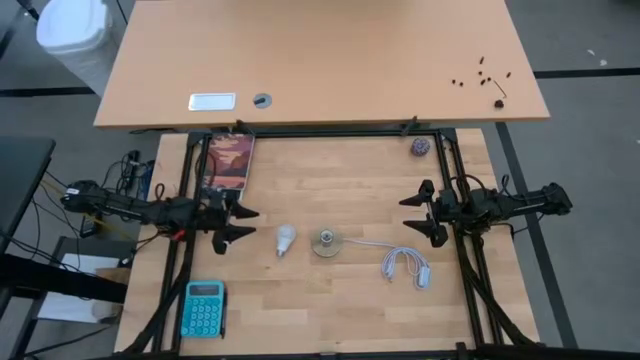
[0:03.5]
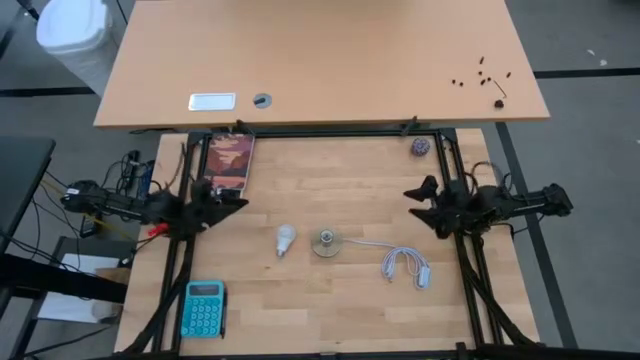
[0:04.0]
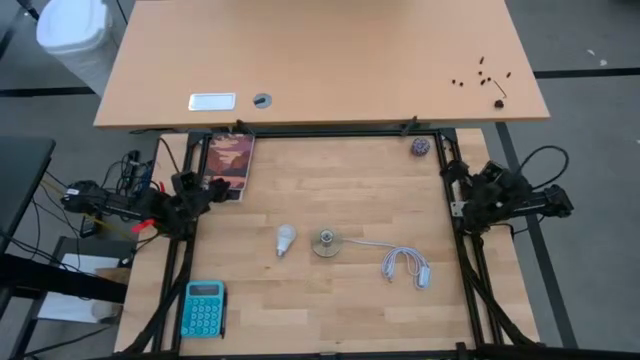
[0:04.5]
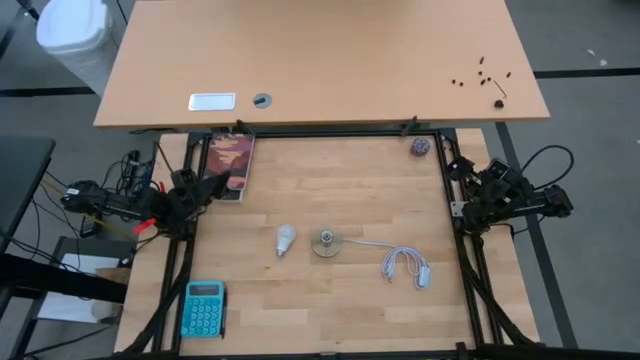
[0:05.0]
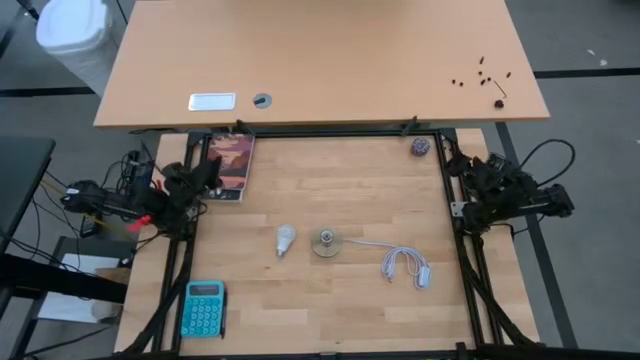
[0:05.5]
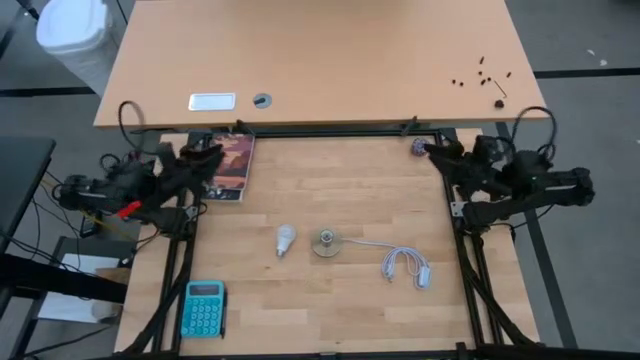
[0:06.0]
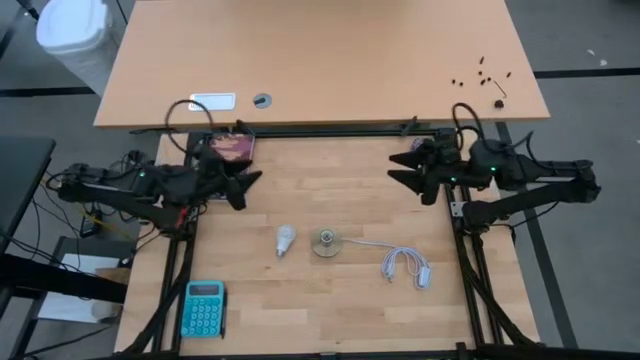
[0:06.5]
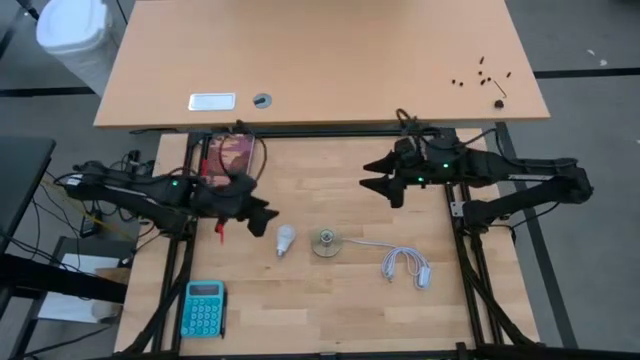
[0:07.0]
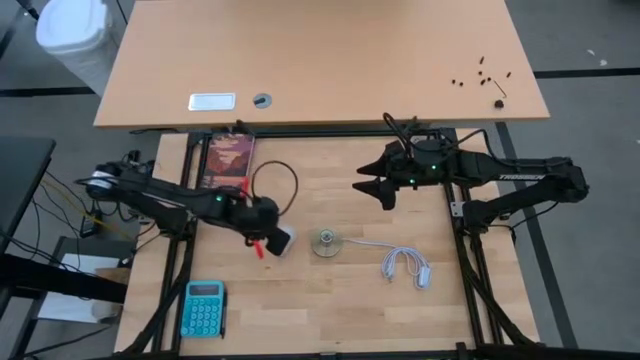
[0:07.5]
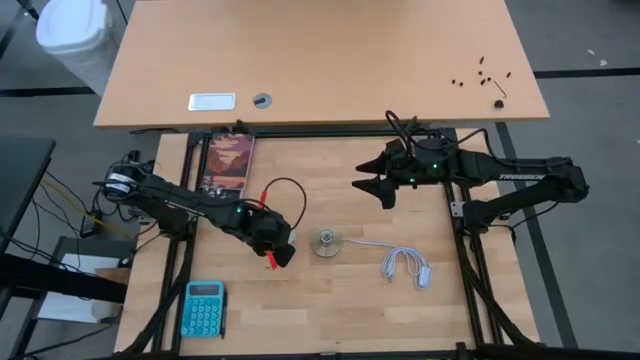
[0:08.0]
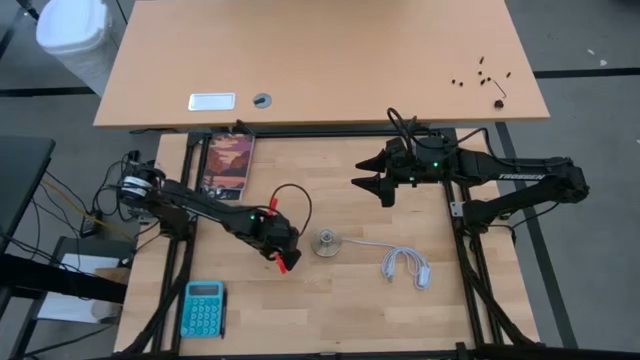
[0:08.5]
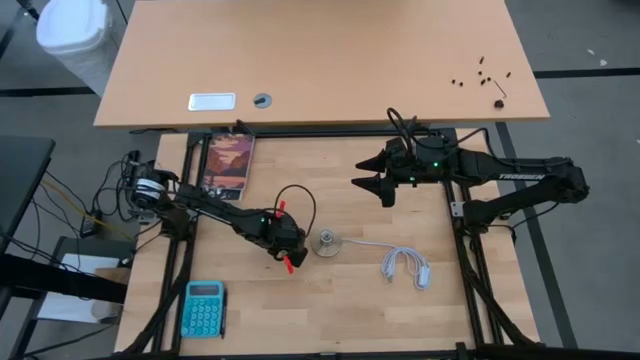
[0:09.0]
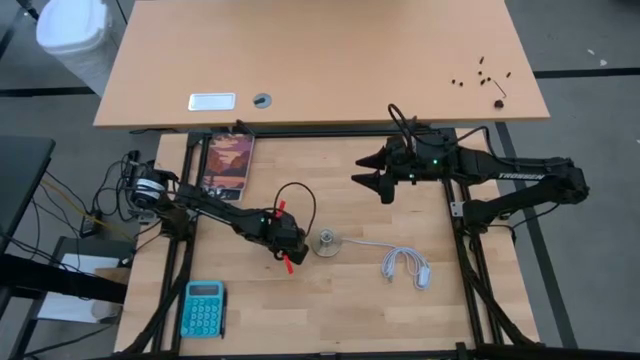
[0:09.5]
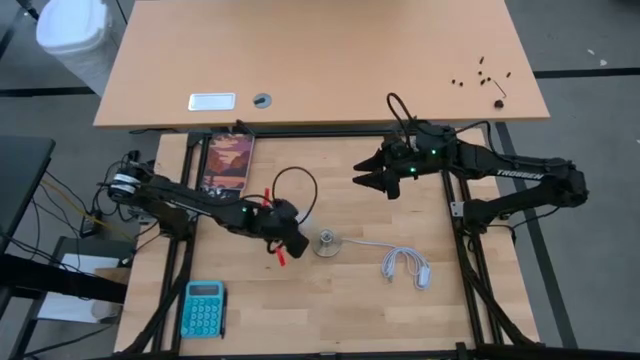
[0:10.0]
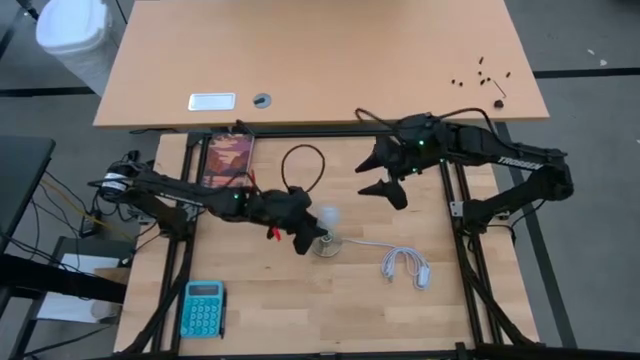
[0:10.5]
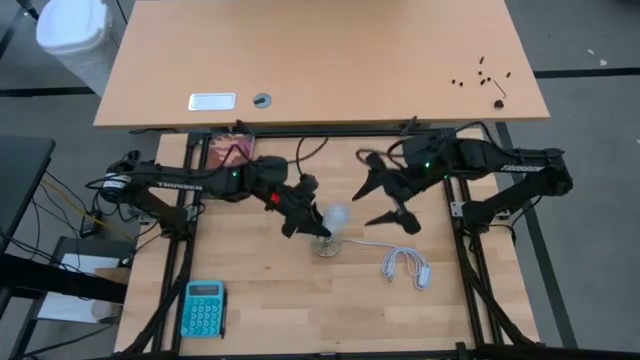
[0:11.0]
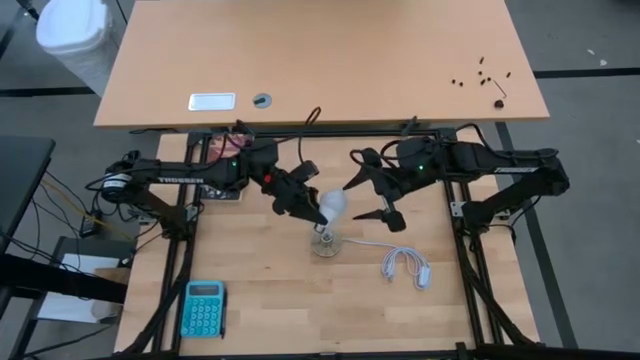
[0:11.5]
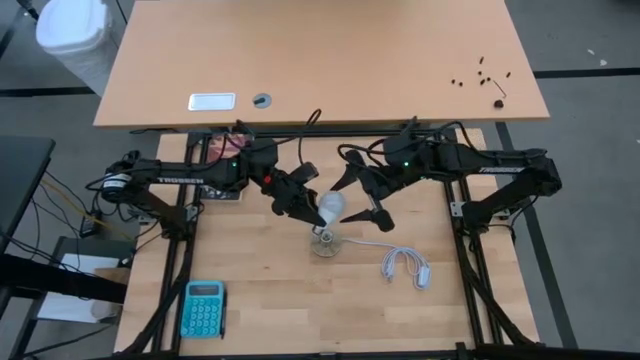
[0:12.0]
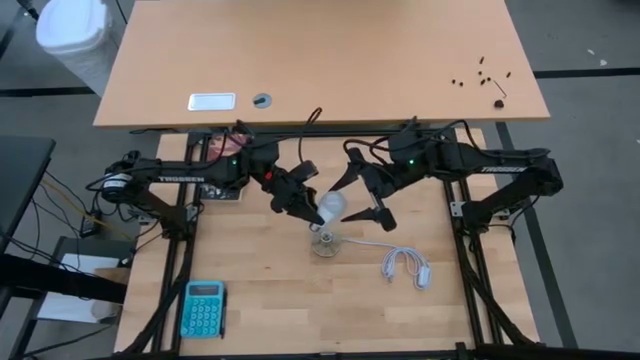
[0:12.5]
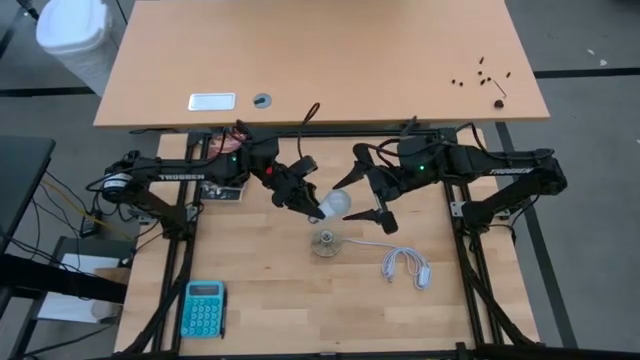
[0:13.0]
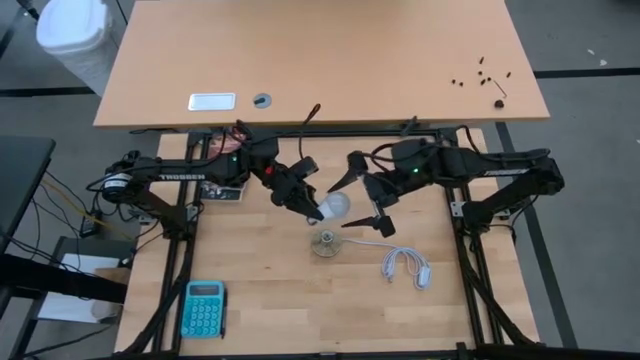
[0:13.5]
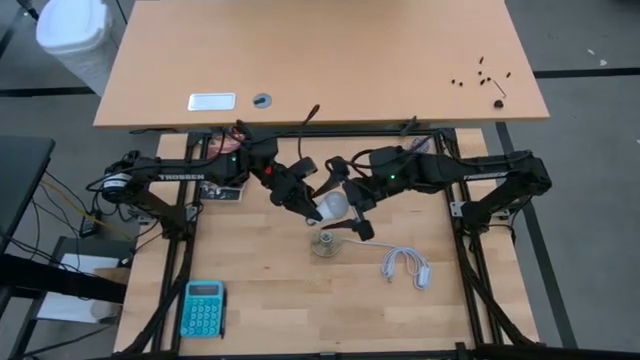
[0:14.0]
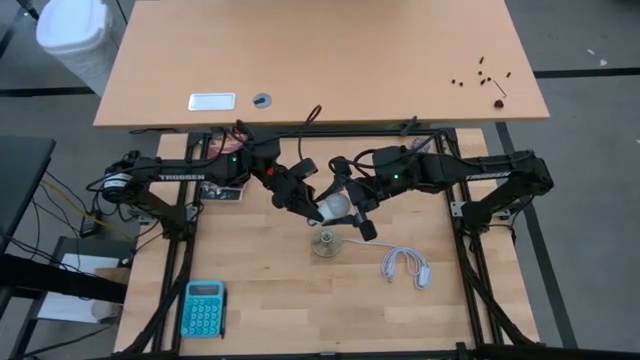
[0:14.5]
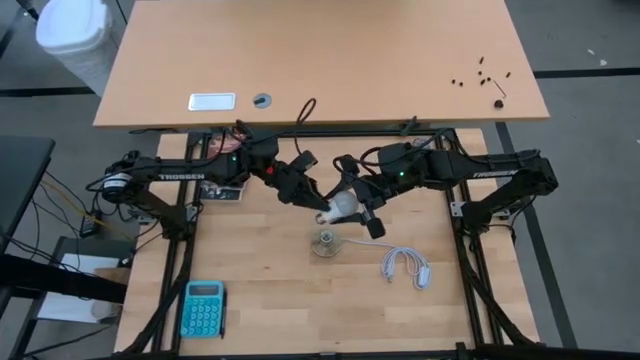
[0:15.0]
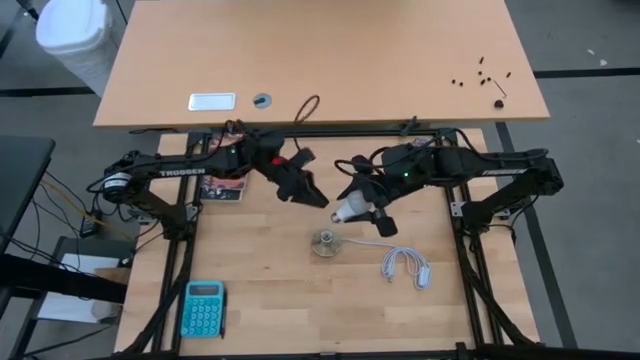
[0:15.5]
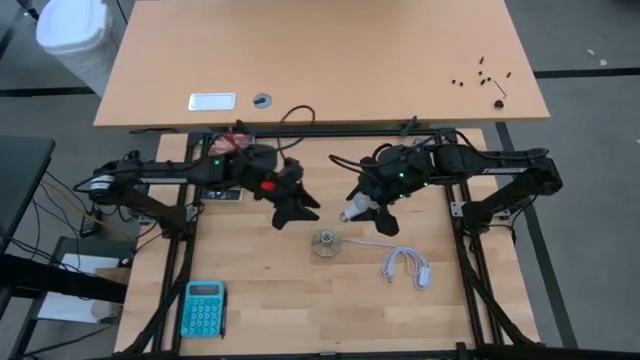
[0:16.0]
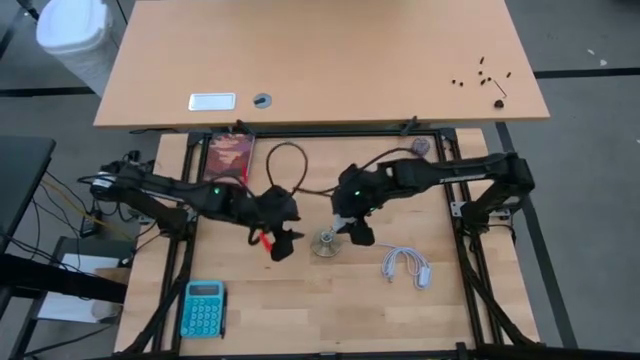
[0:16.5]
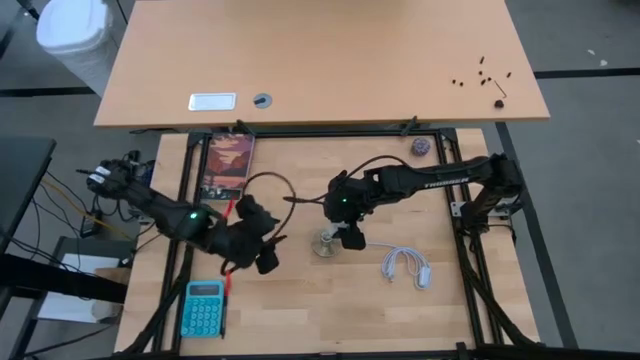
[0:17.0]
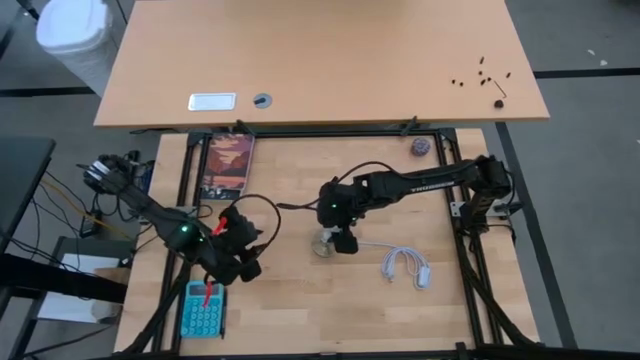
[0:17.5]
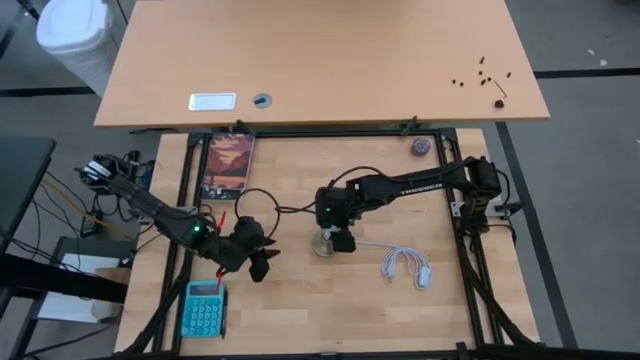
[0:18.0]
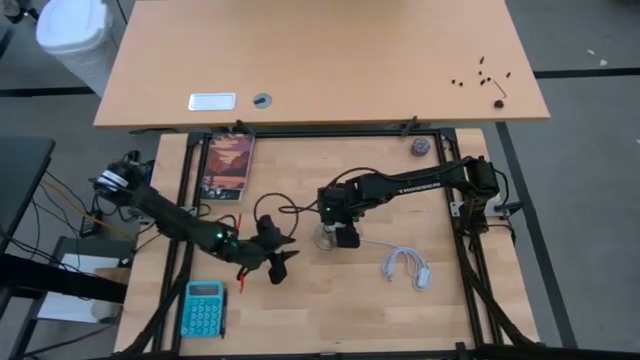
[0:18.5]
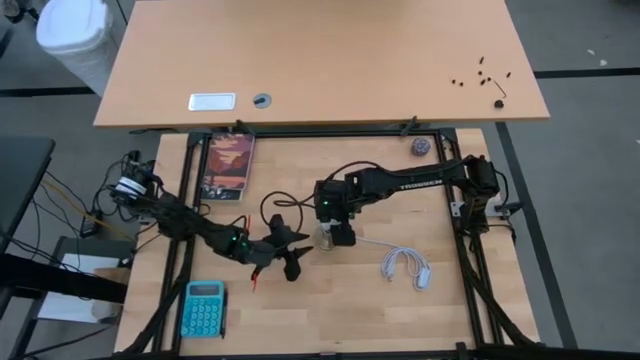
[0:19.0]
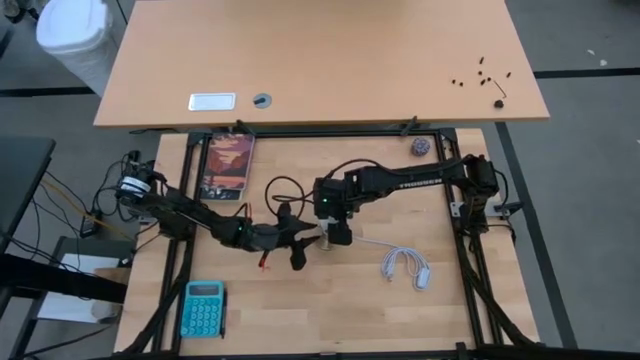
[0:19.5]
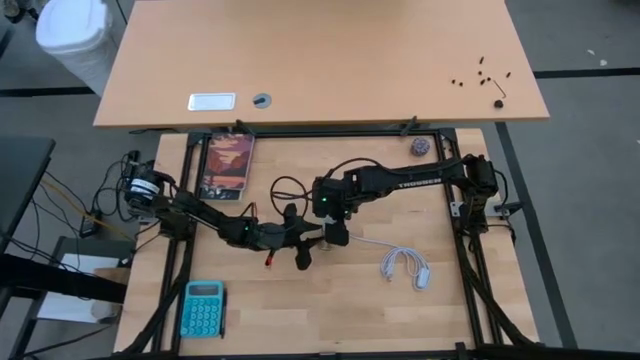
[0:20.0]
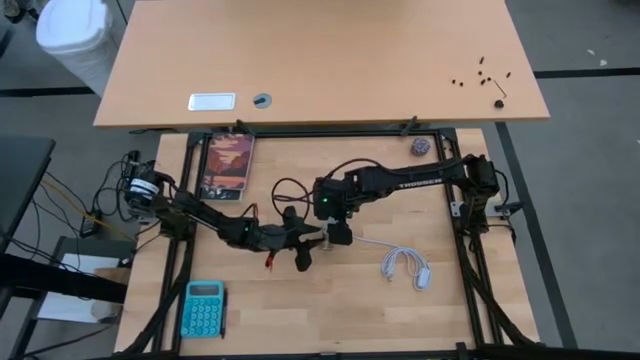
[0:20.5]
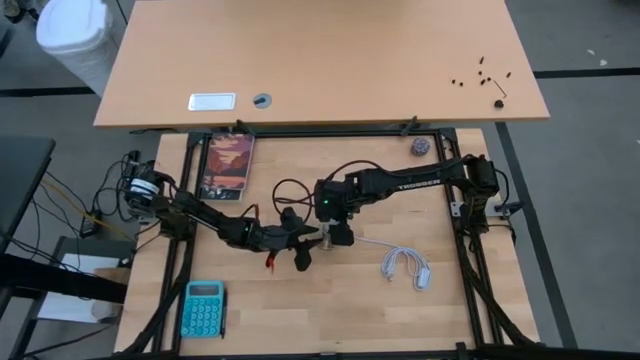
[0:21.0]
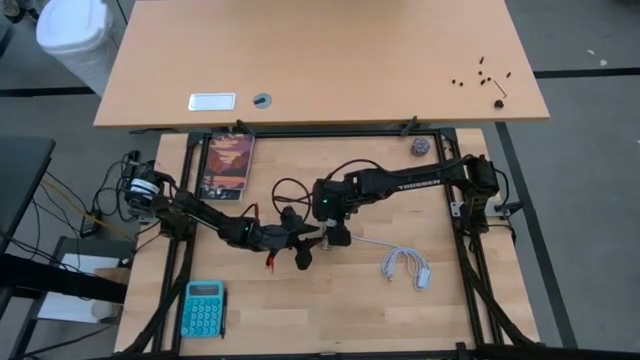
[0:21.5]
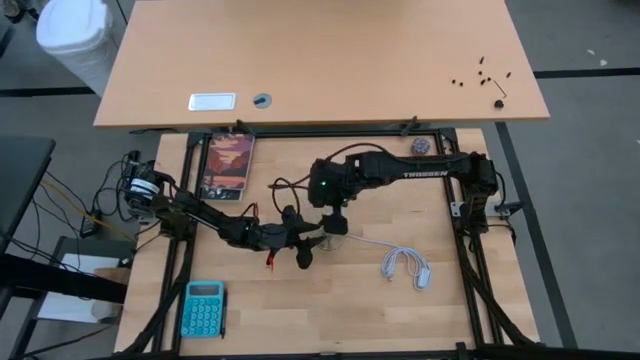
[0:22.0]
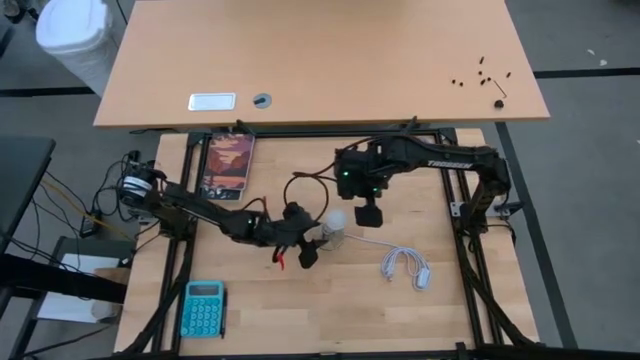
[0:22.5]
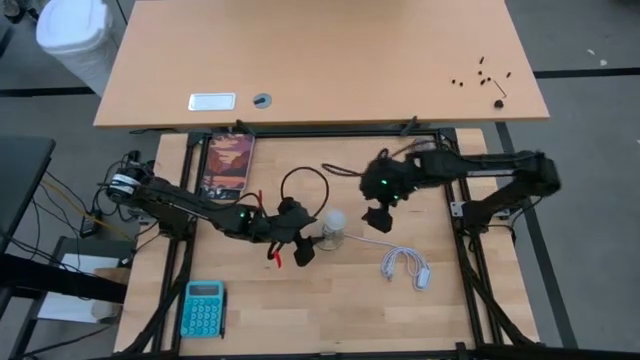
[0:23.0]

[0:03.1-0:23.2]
Task: Screw lightbulb
Insert the lightbulb into the desk lamp
